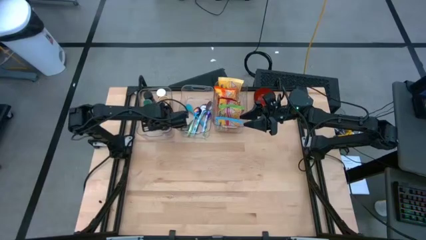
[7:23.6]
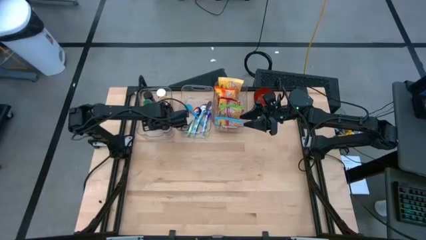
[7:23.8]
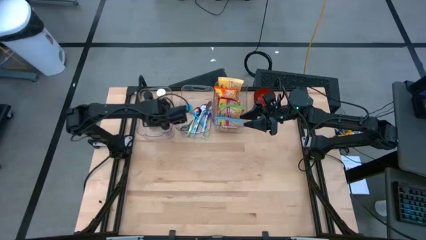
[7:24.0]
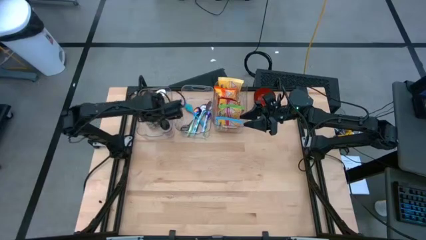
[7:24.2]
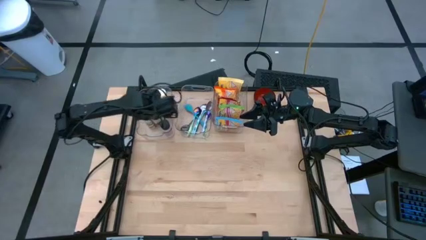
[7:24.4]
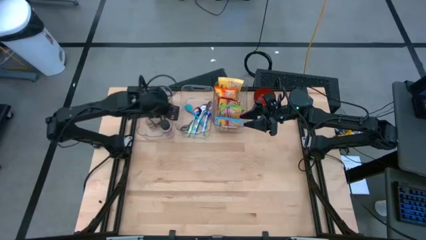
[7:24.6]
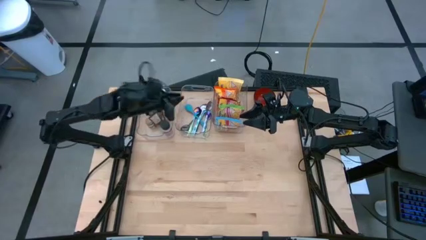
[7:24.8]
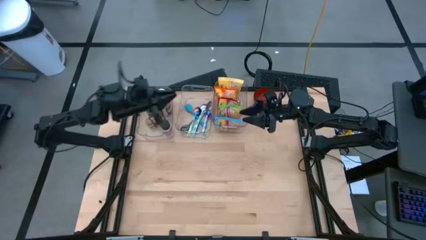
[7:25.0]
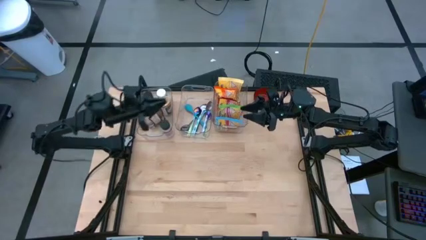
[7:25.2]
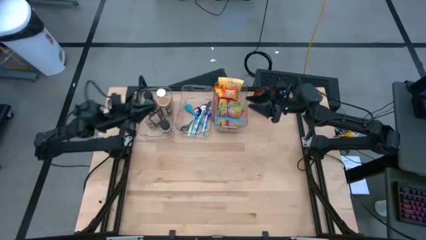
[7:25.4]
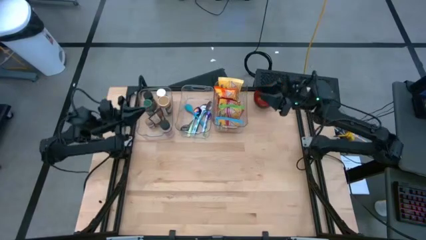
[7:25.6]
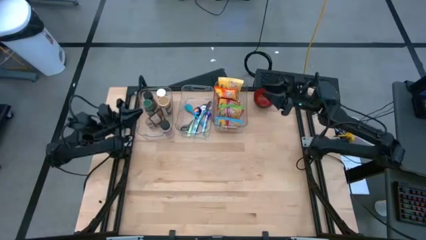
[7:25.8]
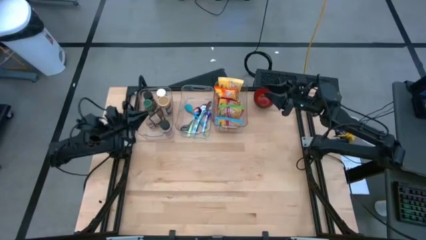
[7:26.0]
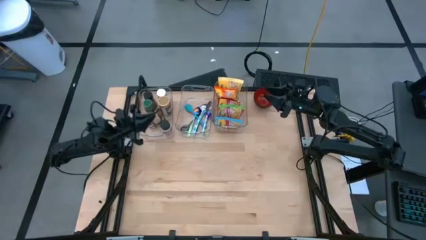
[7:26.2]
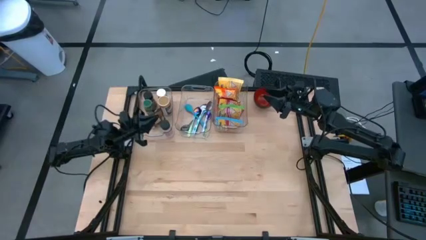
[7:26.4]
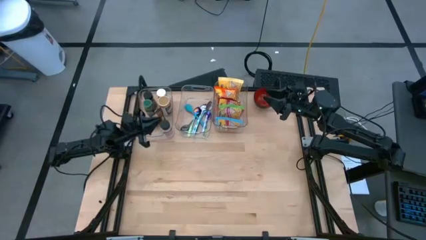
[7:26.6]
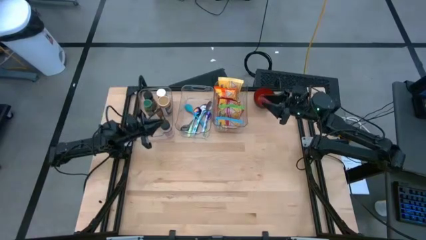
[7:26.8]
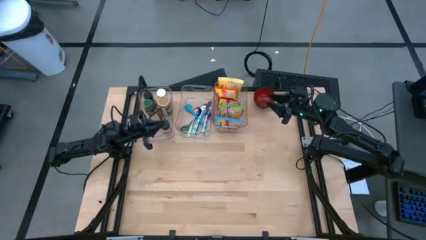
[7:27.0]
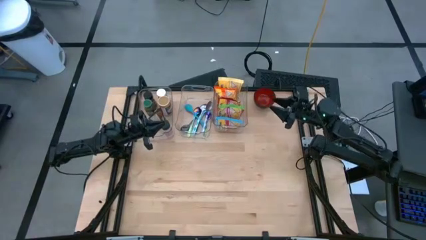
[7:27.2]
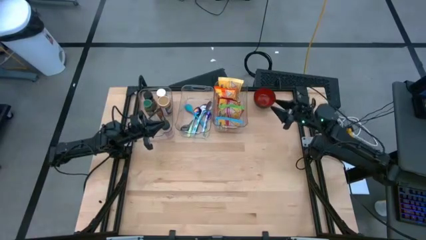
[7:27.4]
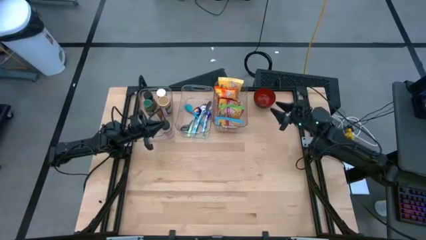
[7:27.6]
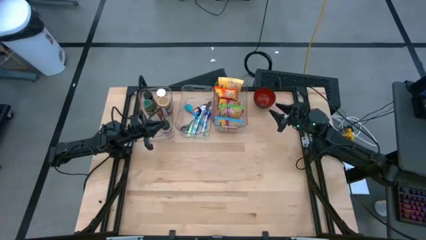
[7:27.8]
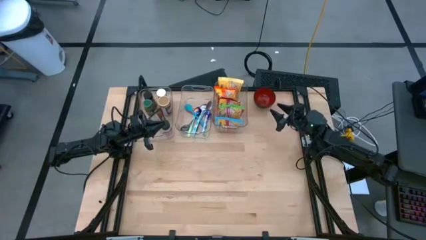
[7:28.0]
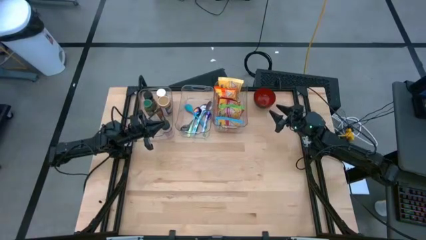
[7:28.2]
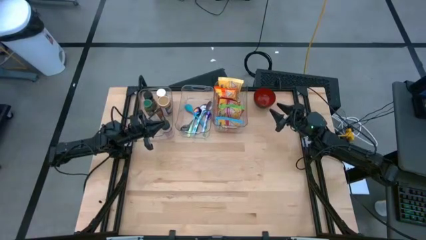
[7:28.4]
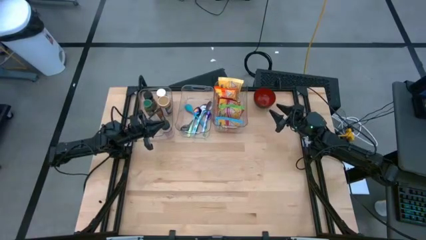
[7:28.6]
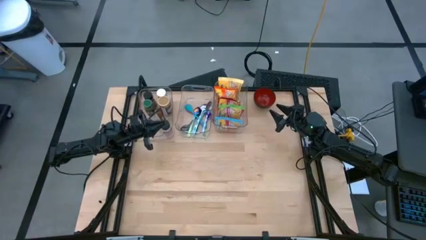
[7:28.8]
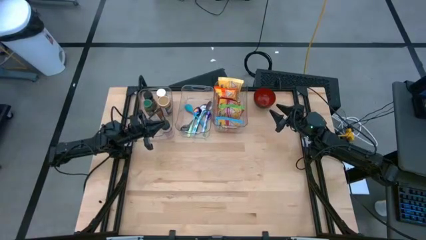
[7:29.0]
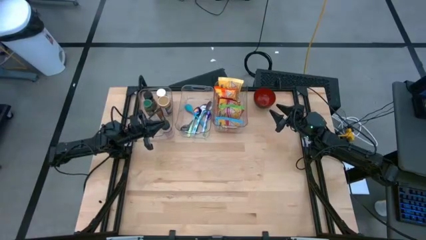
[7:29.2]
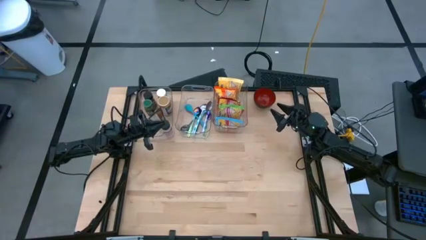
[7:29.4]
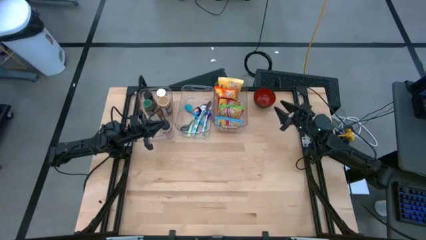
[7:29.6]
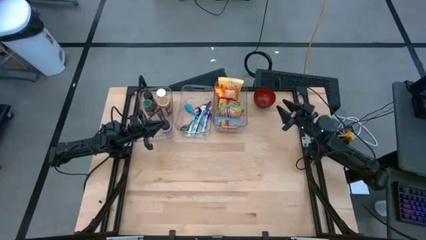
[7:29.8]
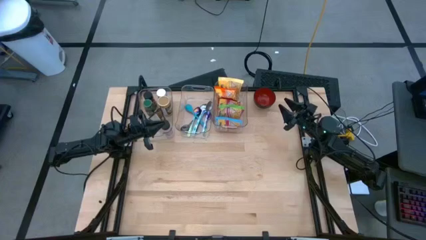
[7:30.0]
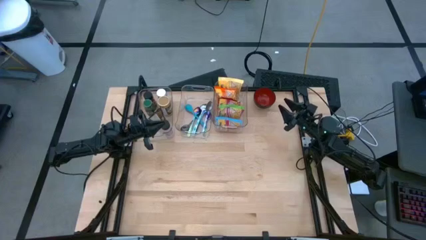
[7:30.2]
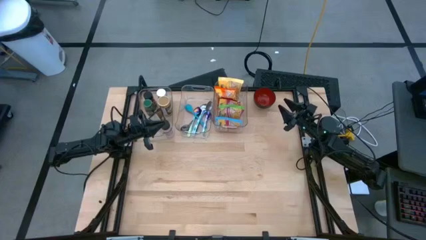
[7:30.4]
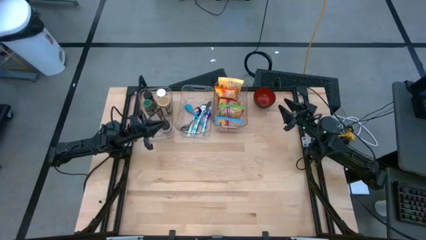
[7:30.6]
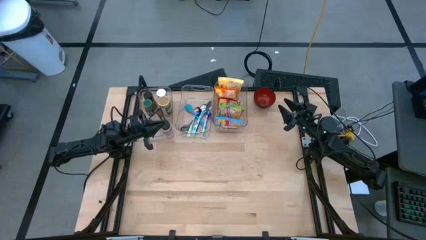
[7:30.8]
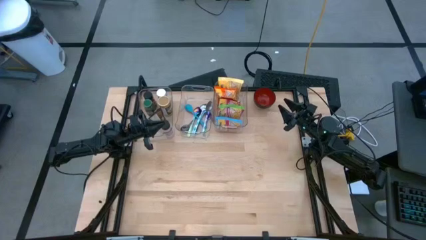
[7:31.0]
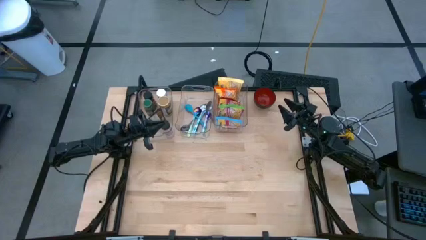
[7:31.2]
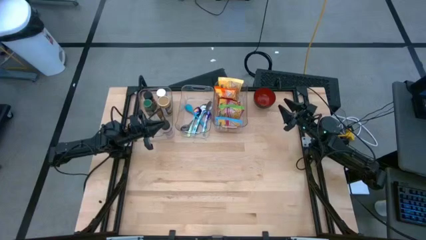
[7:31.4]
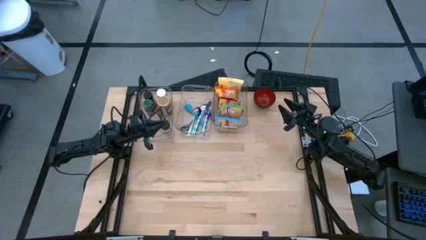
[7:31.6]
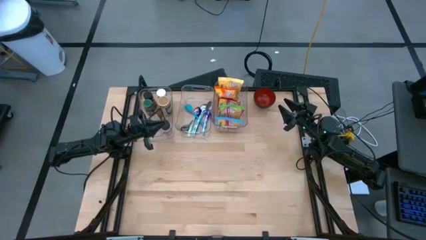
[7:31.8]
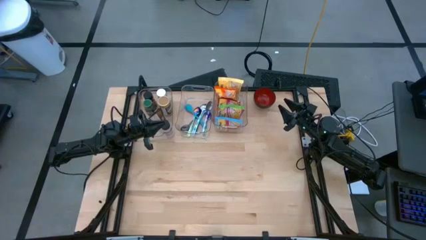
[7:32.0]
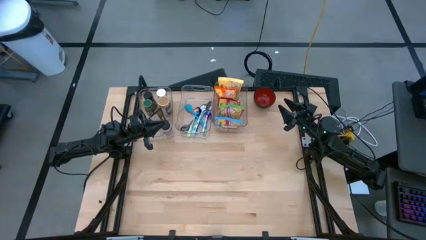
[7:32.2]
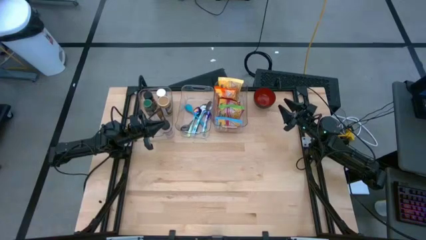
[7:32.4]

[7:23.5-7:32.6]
Task: Pick & Place Food Item
Return to Home Position

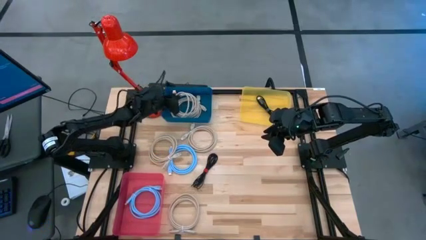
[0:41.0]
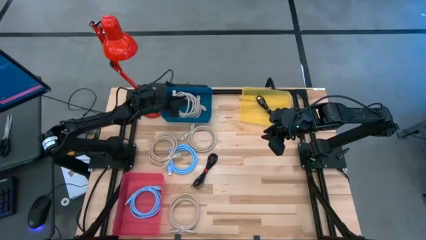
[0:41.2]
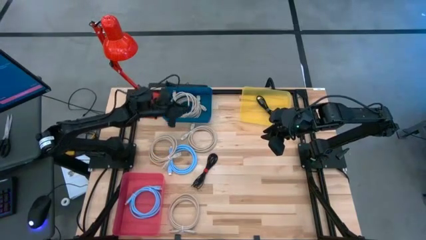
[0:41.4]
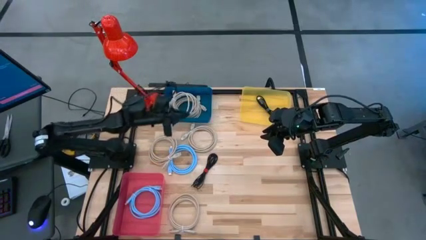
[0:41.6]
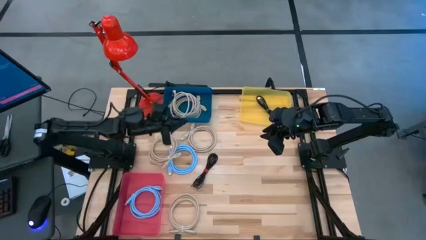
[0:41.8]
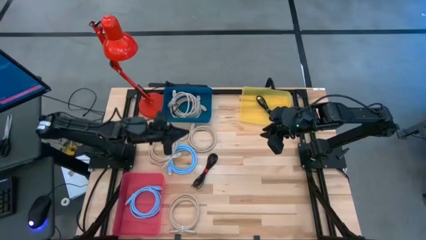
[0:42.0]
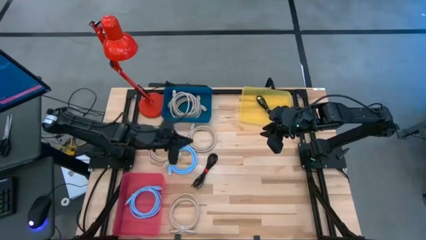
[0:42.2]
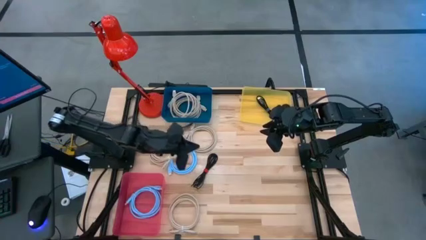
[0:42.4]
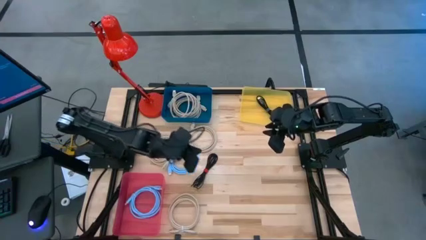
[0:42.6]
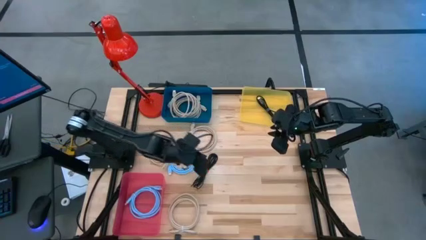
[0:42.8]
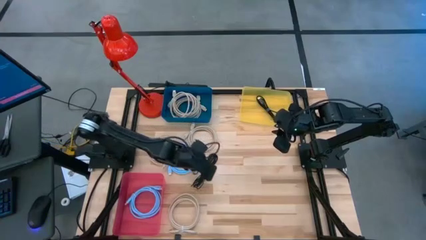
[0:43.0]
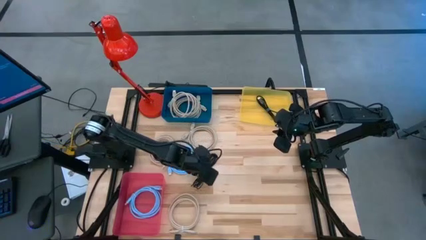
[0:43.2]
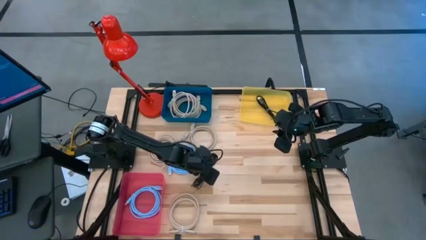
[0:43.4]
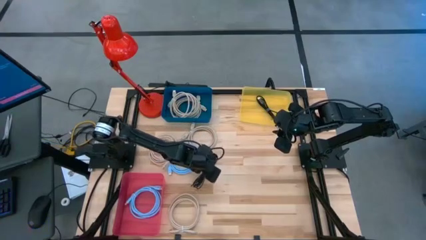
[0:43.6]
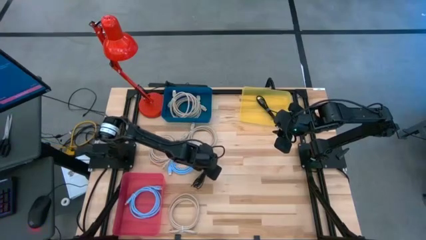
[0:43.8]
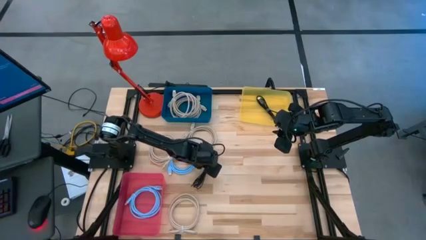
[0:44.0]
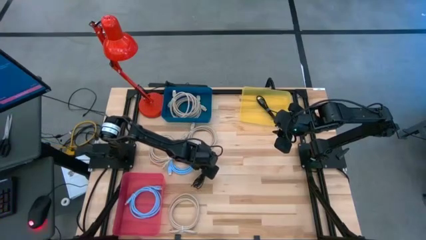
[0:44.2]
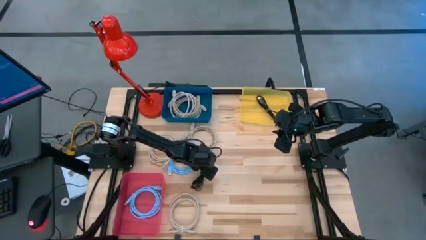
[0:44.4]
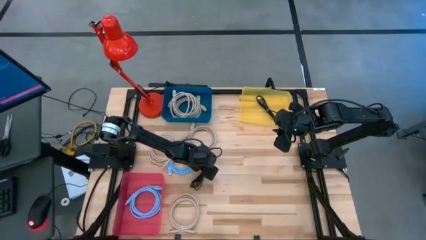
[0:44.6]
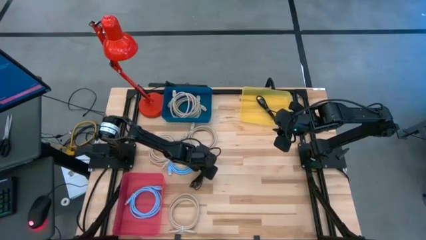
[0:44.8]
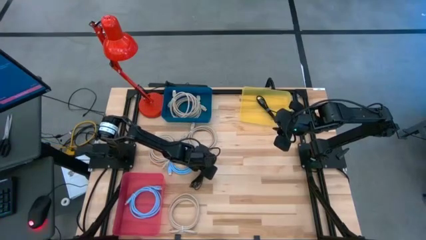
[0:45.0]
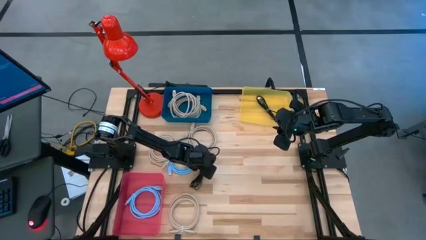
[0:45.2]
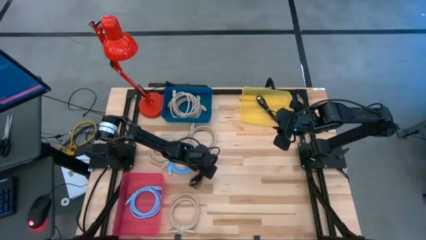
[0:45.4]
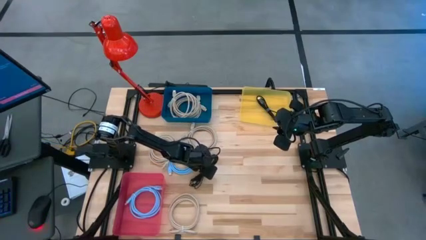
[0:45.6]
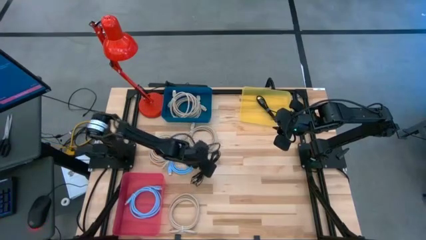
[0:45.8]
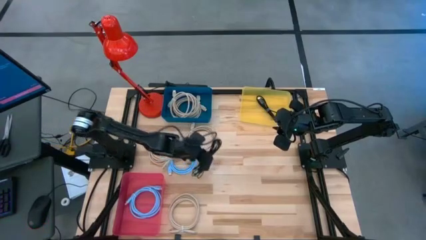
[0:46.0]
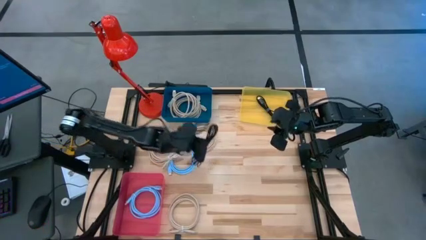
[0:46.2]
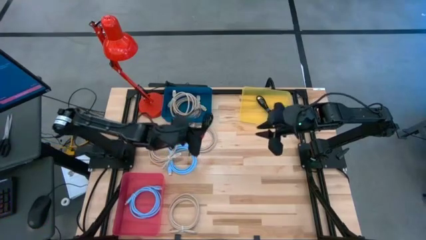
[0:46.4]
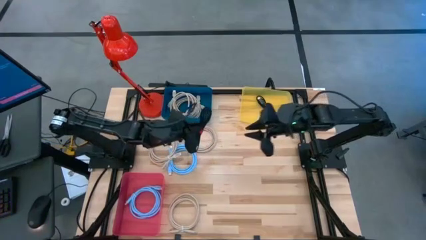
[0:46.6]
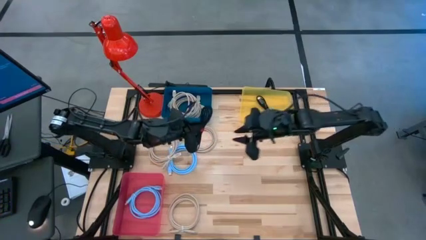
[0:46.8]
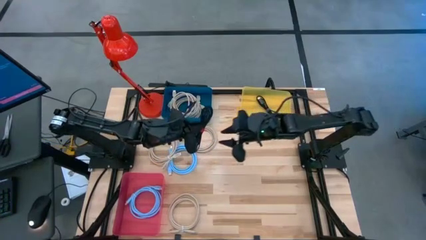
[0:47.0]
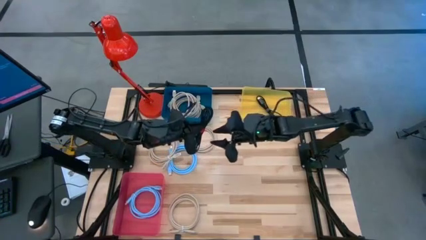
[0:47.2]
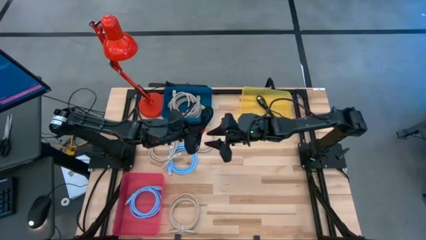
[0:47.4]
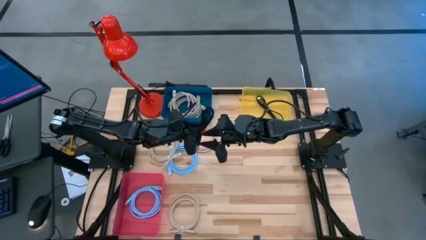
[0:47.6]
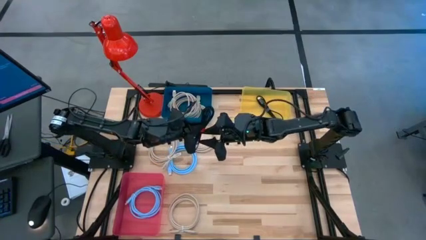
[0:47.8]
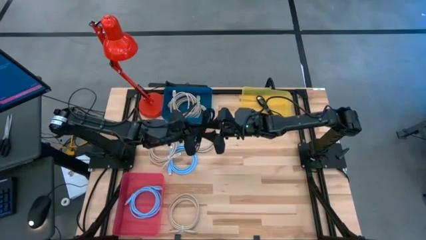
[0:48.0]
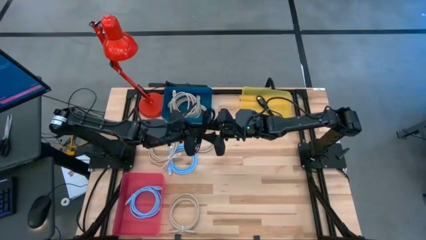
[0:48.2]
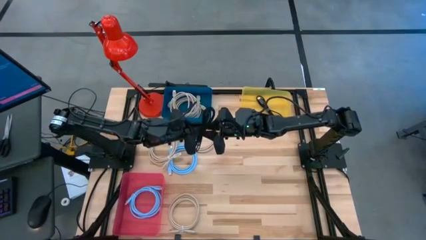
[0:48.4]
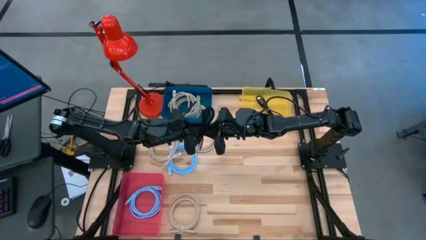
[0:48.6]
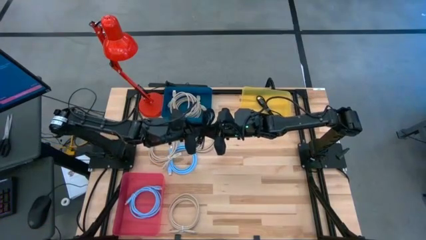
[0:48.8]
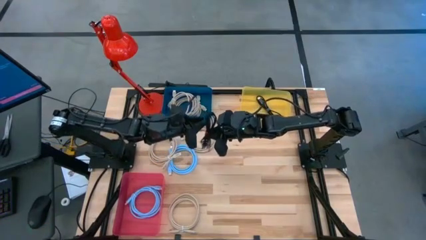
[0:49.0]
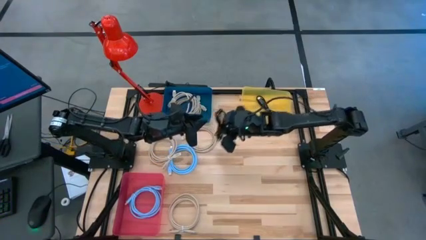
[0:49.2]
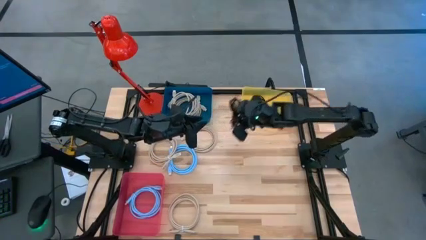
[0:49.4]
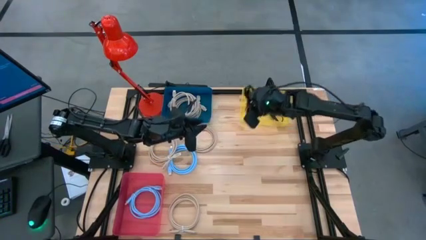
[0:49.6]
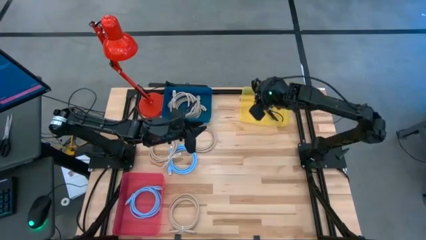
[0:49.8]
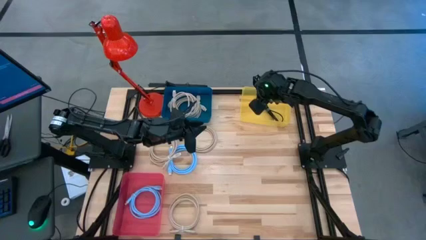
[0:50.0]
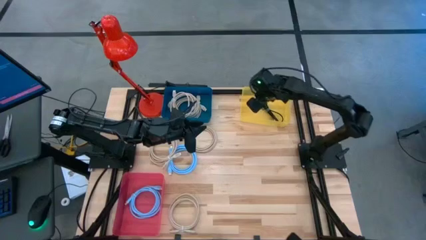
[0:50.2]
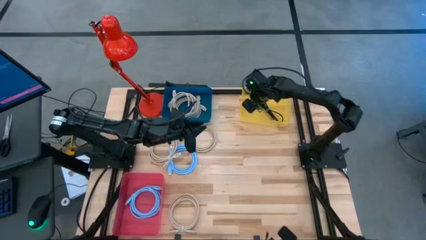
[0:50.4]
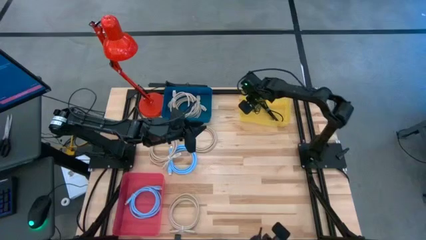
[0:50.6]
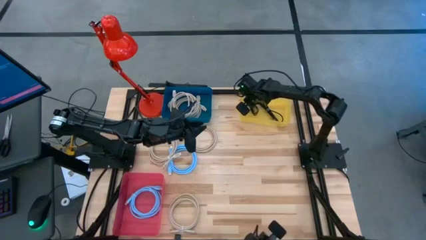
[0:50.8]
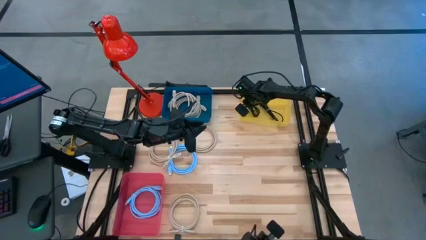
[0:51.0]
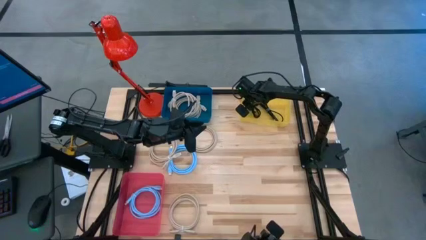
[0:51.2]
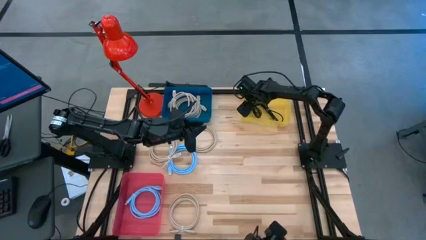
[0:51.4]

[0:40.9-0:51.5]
Task: Pick & Place USB Port
Put the black charger cable into the yellow bin
